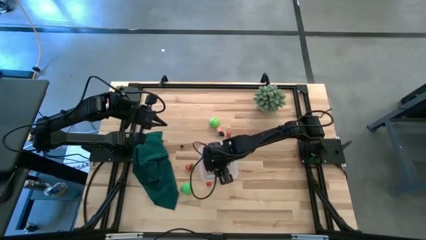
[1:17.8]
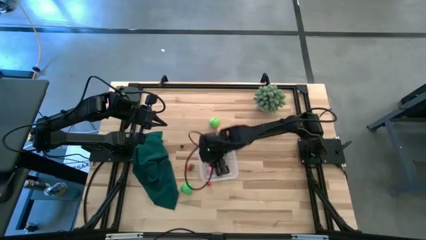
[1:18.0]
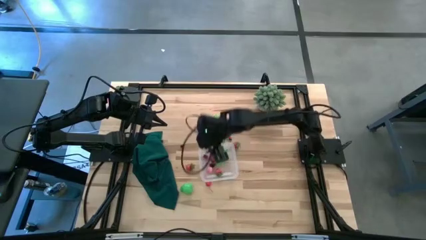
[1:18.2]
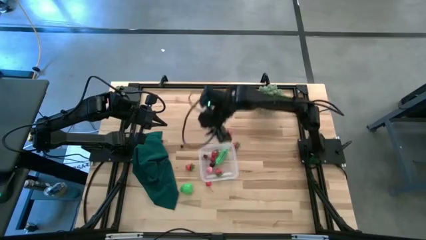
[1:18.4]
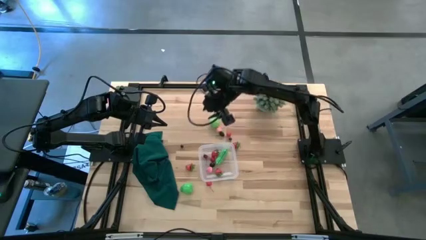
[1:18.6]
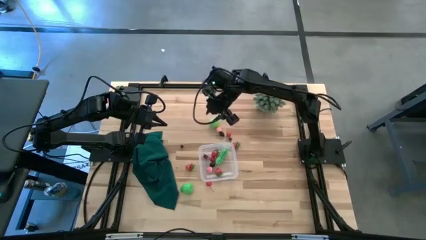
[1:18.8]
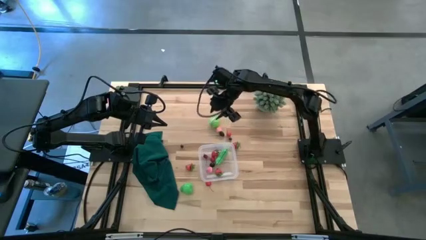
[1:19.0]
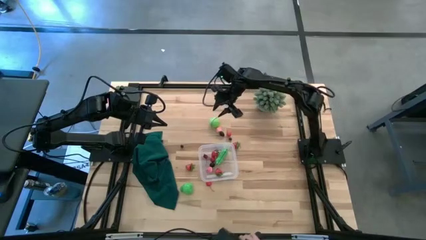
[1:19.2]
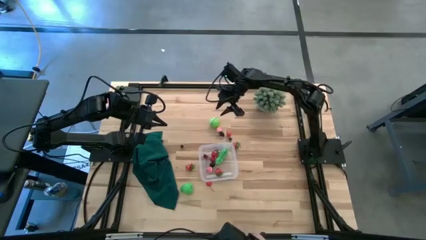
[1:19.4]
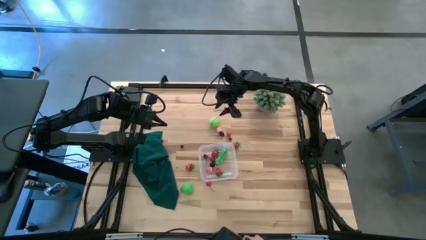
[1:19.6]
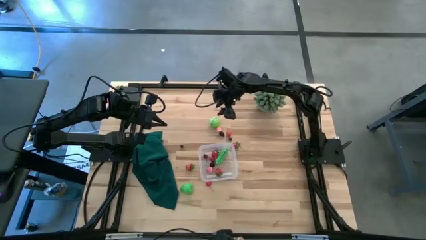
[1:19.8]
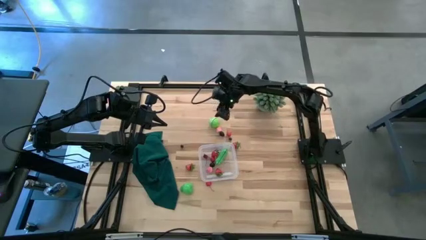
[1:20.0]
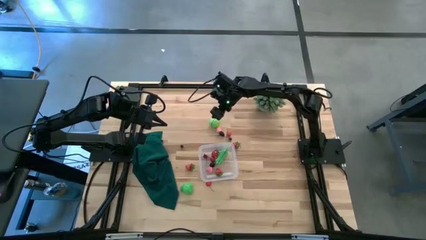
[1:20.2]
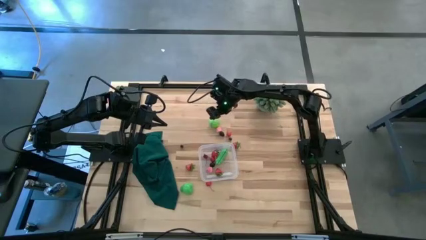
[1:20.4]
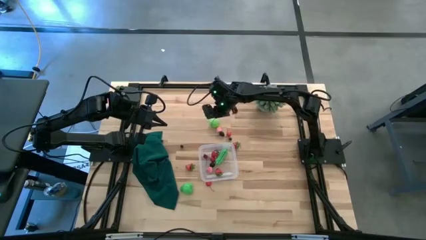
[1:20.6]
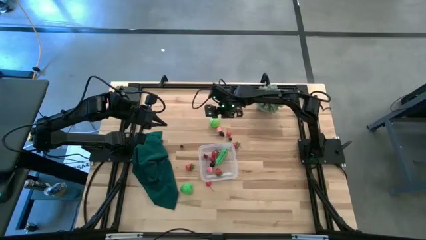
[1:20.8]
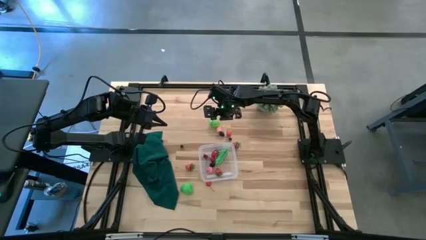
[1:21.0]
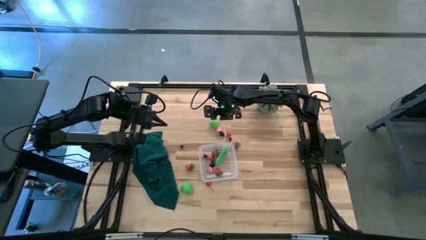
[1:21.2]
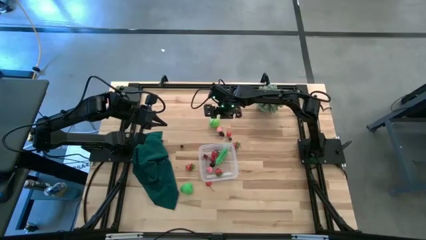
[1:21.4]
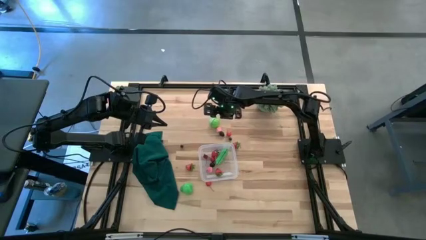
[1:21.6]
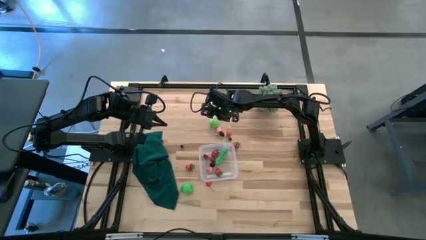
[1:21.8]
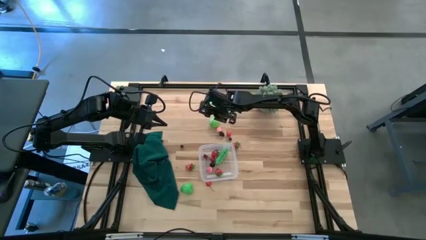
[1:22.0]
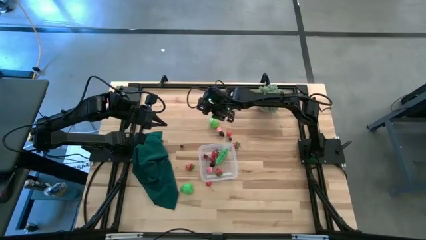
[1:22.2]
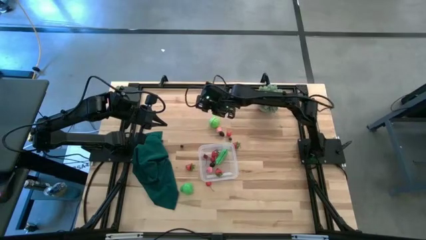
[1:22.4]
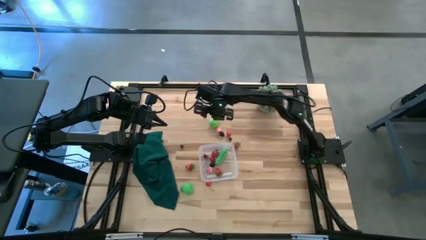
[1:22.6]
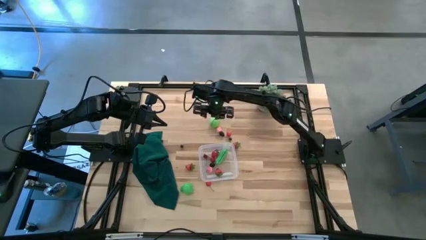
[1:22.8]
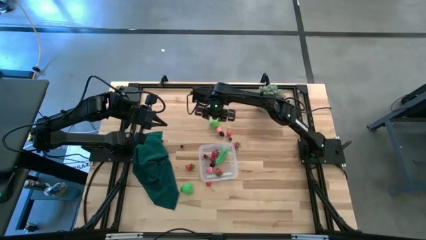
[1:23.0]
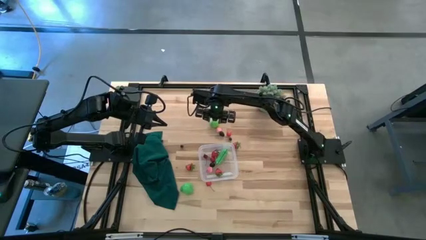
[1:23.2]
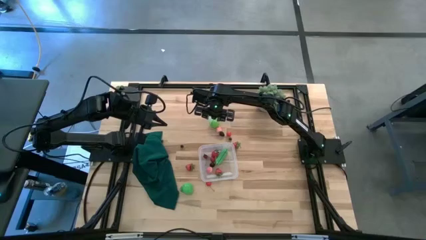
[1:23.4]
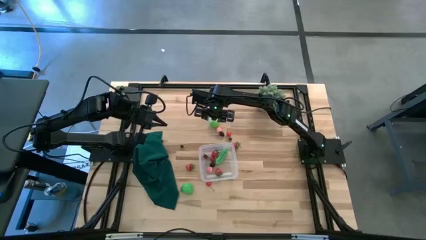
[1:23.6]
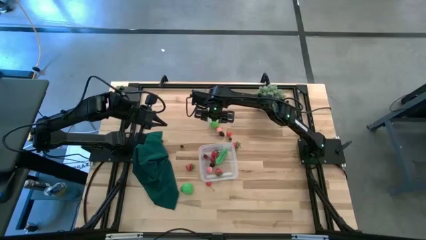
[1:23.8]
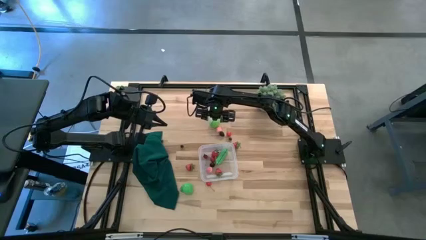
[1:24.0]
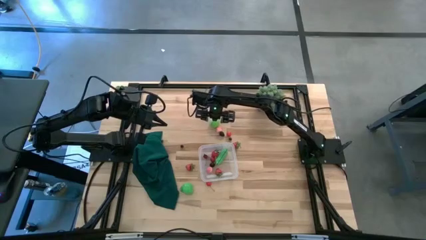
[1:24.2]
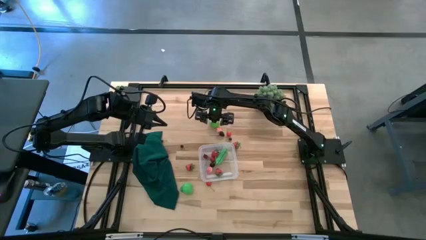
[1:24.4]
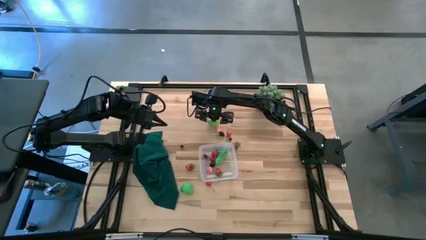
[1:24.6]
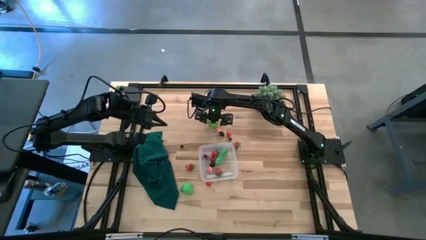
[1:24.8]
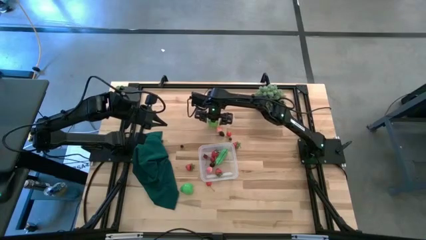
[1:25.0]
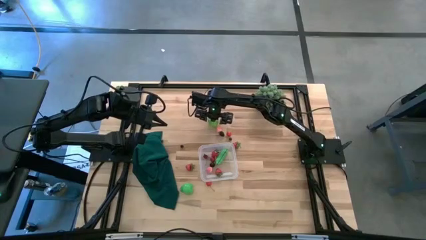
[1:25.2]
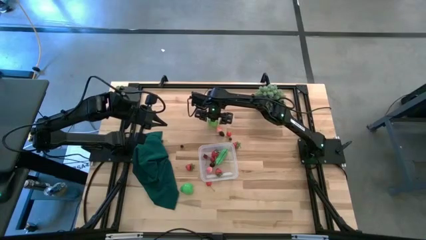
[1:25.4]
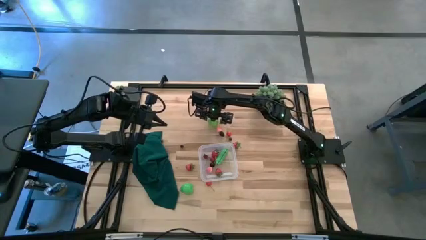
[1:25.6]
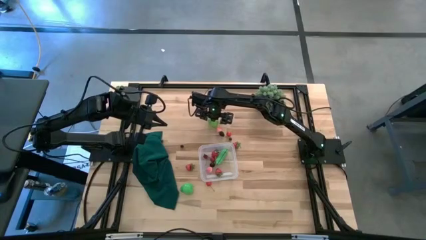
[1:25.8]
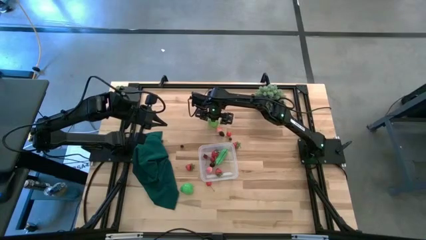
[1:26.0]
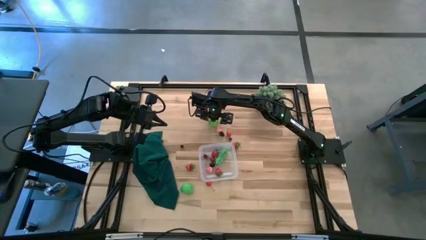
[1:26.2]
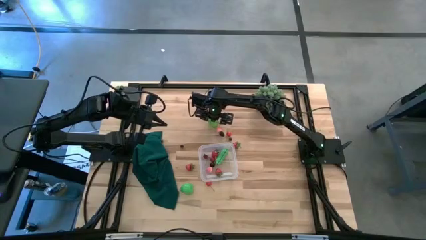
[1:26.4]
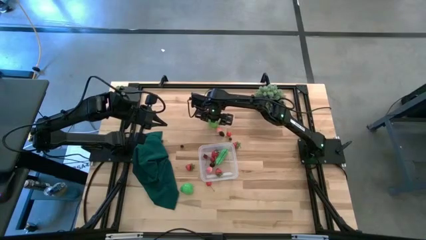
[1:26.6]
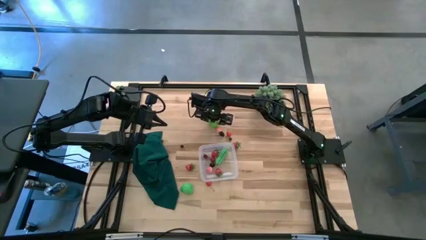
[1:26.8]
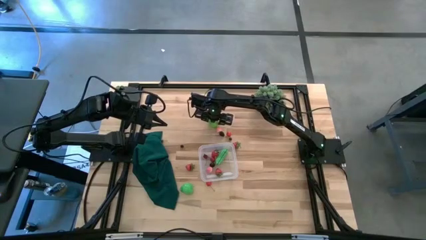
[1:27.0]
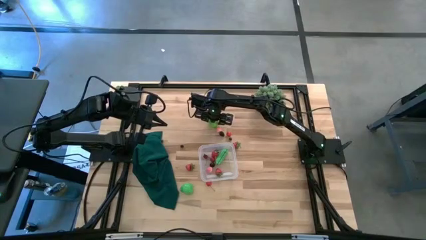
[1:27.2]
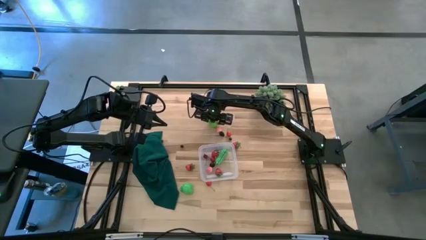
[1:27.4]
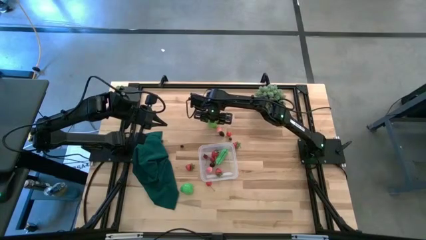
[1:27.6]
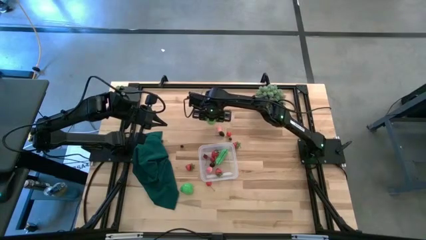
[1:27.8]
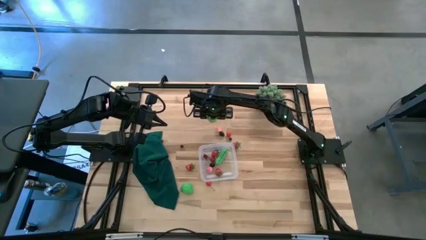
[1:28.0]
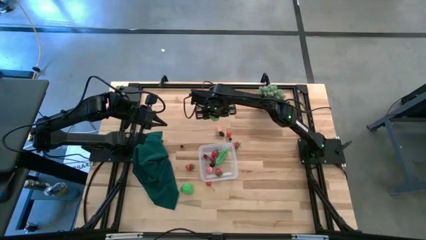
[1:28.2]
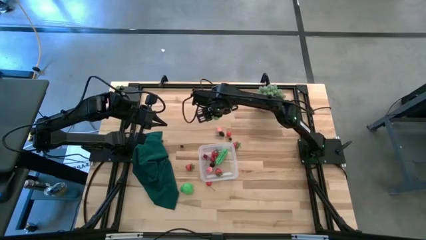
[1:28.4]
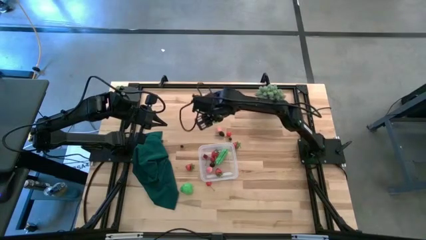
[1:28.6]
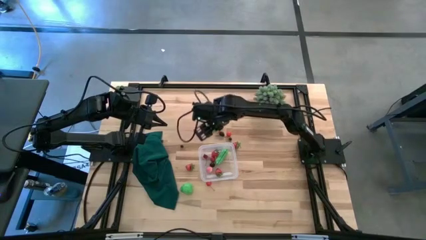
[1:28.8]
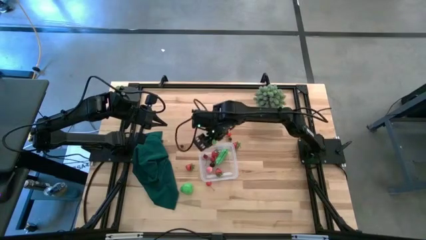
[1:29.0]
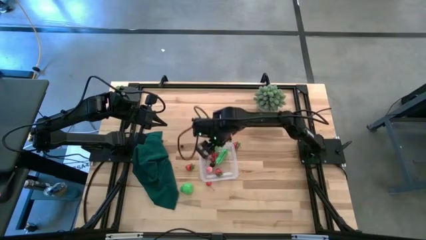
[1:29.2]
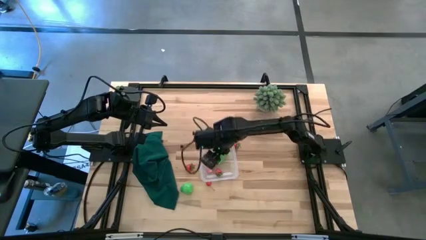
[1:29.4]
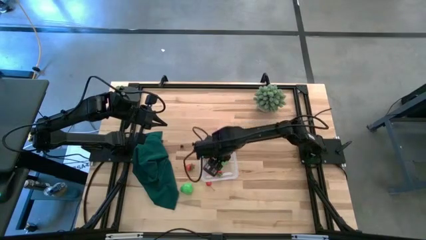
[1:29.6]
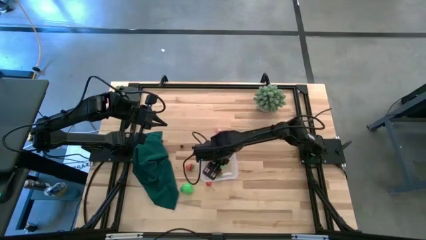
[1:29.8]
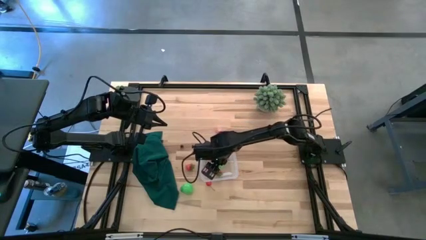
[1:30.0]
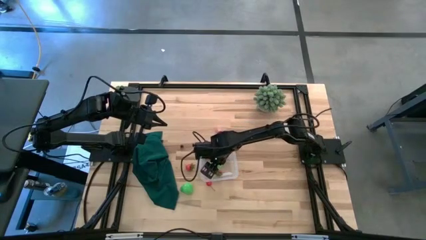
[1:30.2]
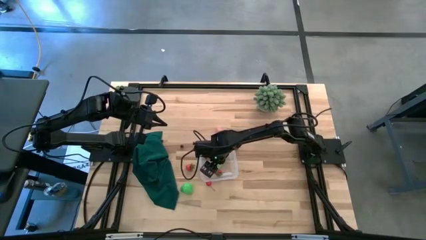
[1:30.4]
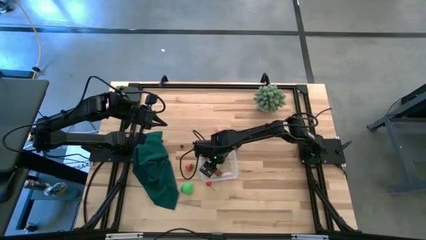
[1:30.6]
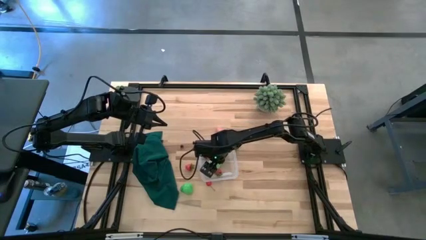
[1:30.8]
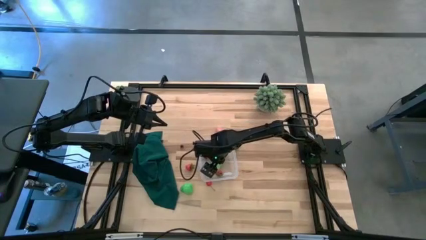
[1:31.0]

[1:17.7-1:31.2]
Task: Pick and placing Produce into tupperware
Put the green cabbage into the transparent bin

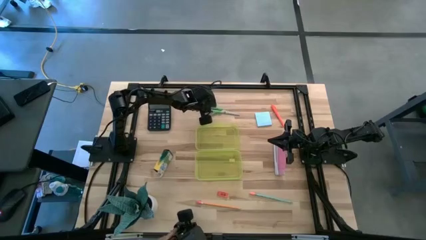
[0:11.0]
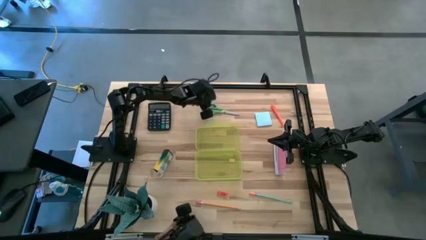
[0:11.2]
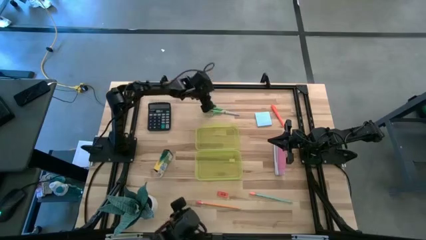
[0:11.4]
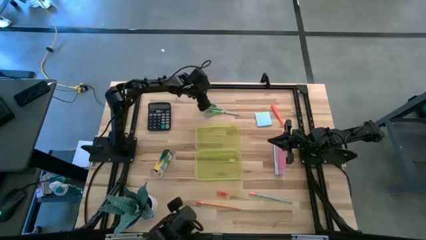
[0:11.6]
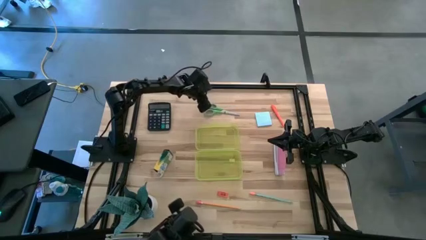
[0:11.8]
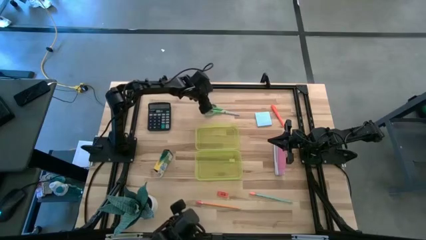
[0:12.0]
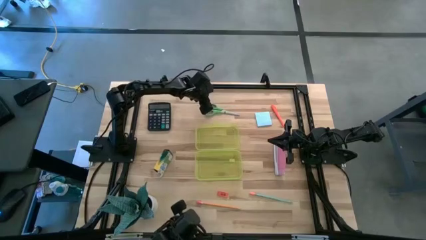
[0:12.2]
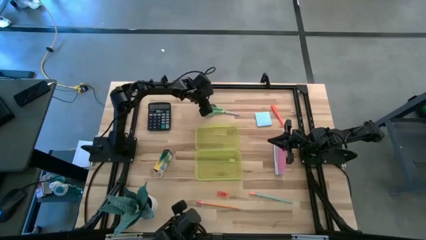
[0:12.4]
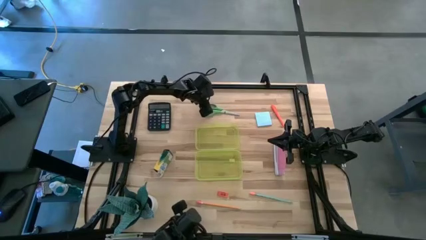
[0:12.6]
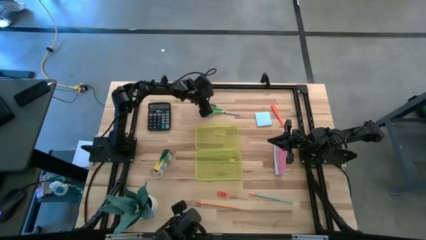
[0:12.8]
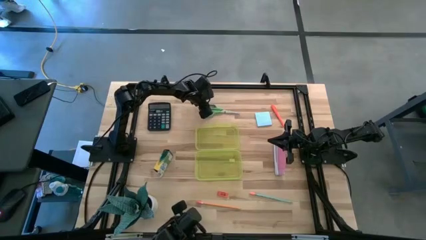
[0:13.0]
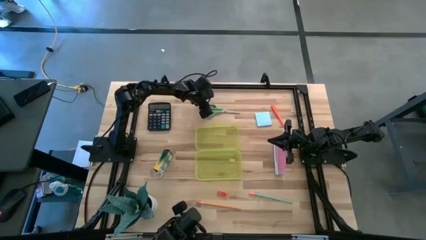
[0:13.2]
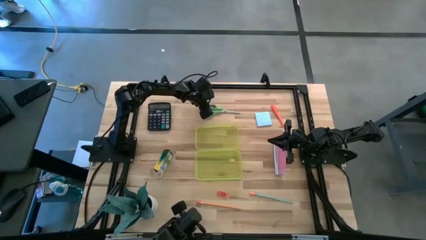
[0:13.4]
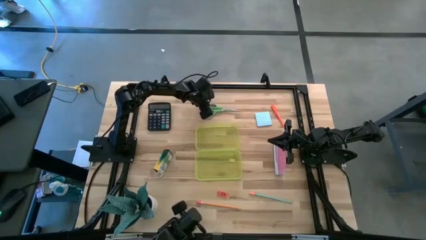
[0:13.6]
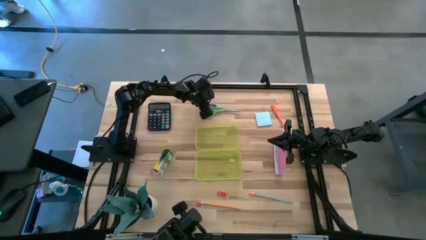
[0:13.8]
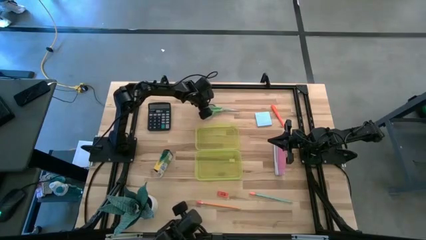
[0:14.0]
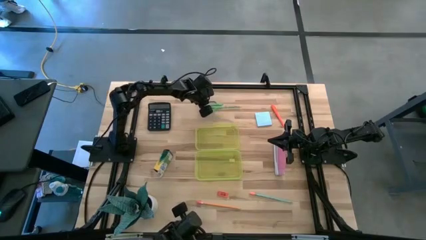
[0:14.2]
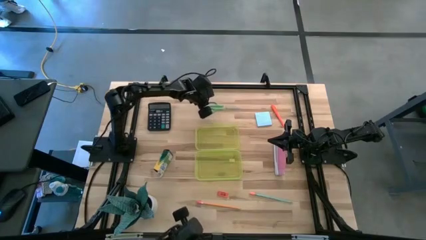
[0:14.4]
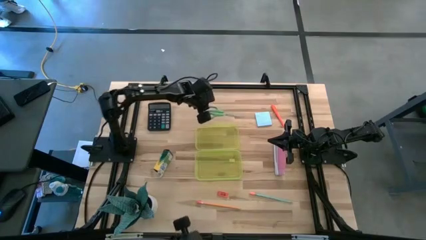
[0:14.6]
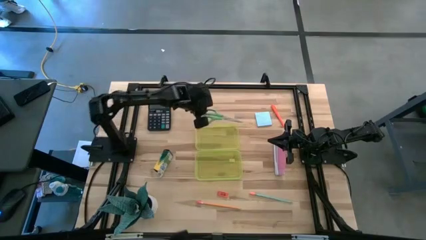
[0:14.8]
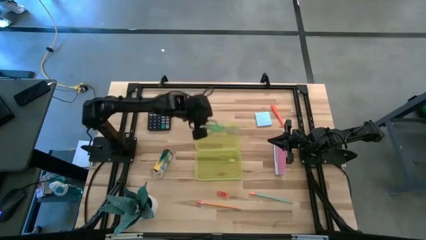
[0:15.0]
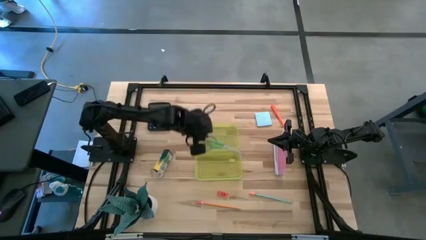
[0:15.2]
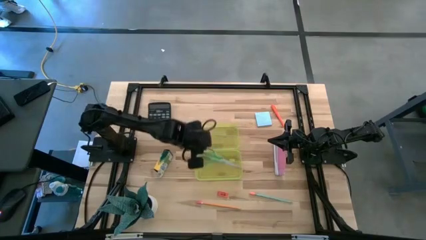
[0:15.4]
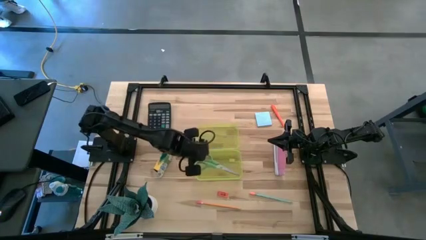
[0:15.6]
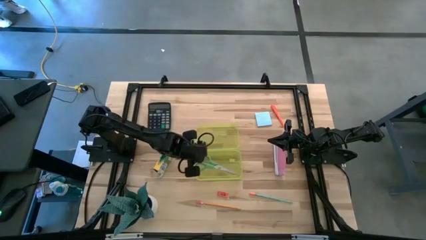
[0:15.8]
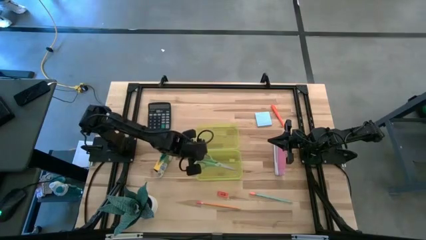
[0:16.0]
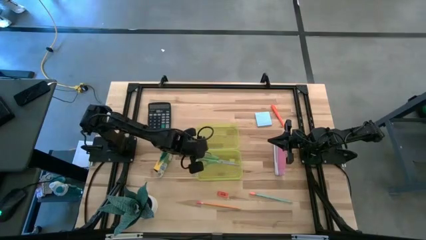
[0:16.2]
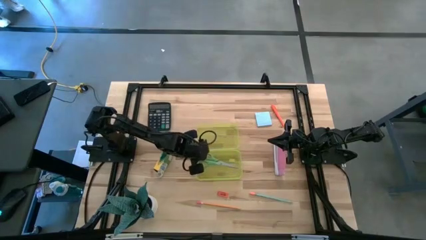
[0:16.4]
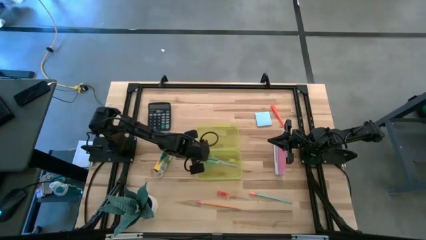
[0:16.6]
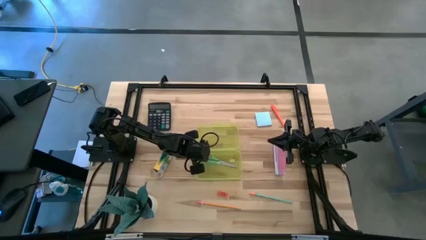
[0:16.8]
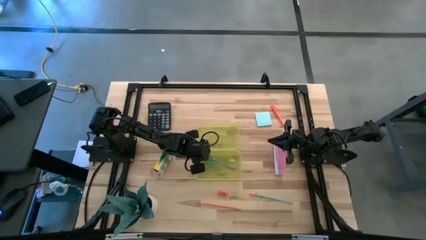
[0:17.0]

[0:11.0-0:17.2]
Task: Pack school essentials
Put the green scissors into the yellow supply box
